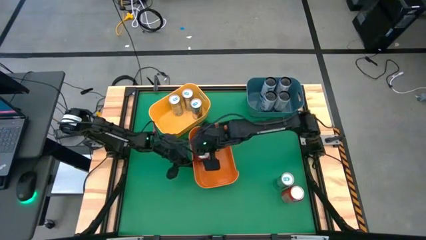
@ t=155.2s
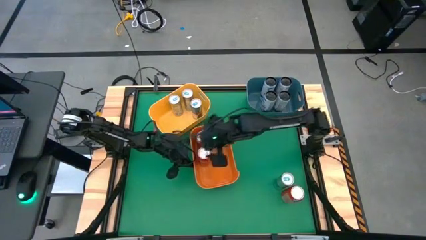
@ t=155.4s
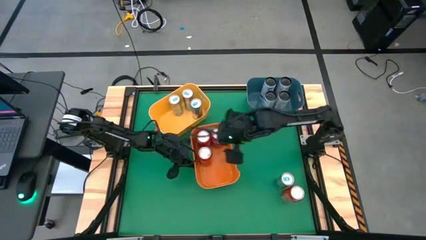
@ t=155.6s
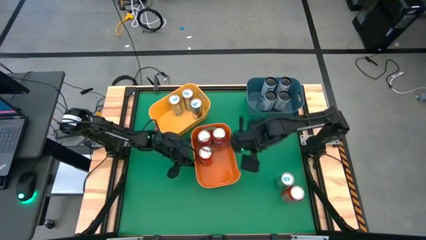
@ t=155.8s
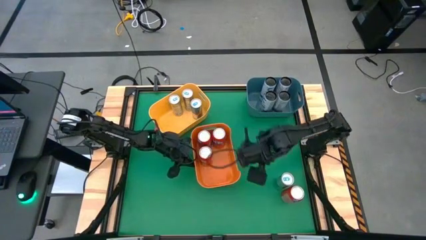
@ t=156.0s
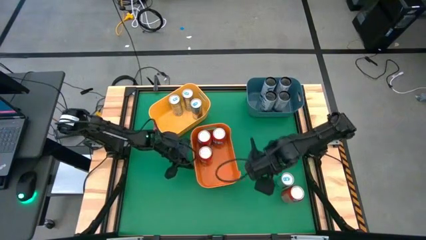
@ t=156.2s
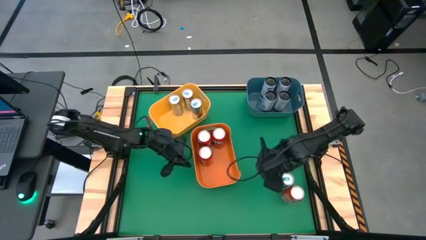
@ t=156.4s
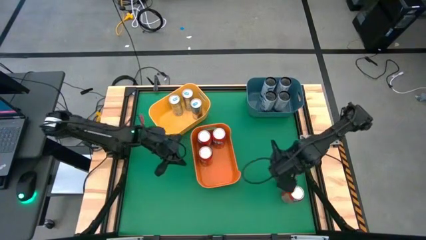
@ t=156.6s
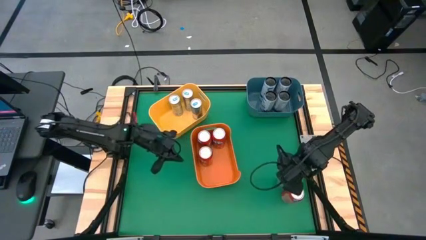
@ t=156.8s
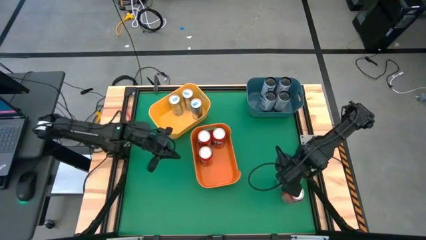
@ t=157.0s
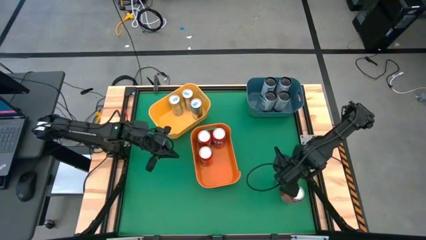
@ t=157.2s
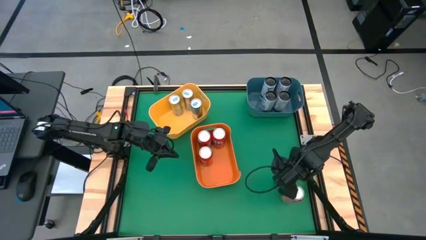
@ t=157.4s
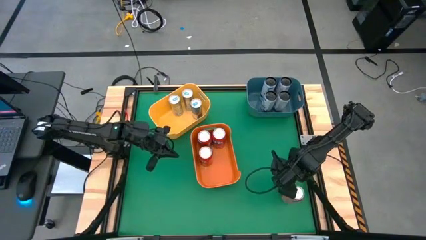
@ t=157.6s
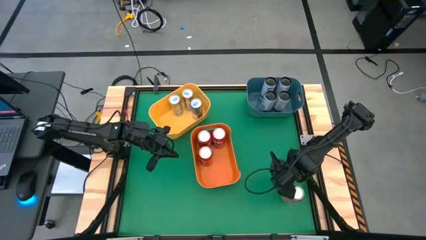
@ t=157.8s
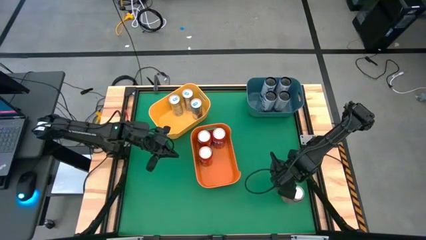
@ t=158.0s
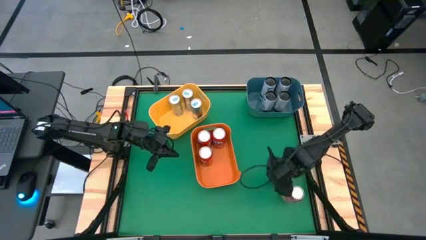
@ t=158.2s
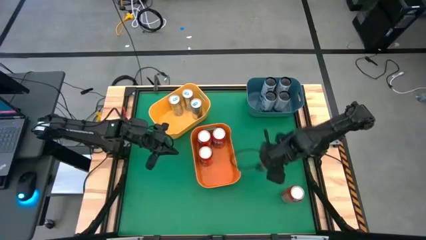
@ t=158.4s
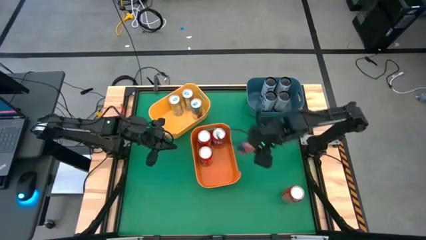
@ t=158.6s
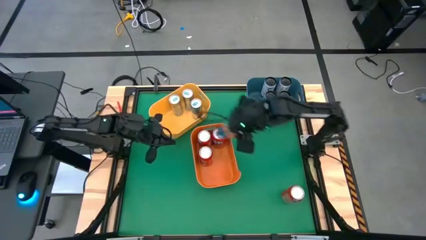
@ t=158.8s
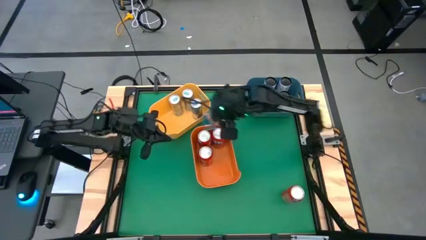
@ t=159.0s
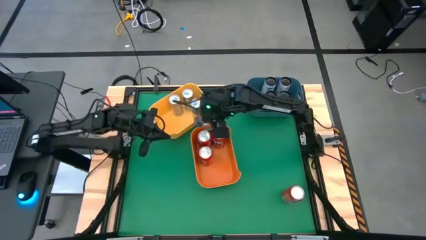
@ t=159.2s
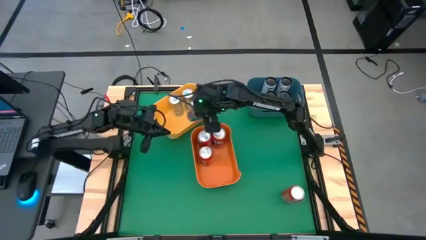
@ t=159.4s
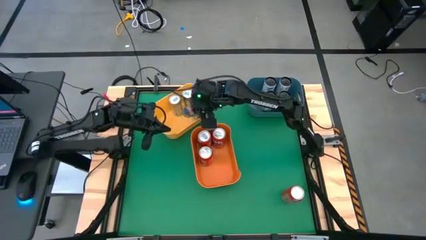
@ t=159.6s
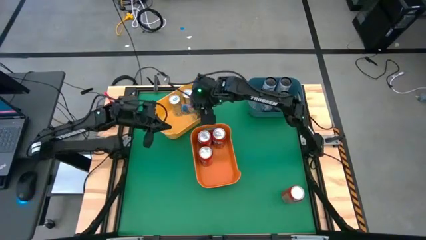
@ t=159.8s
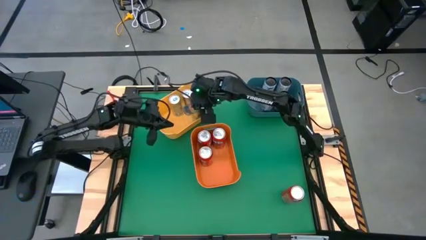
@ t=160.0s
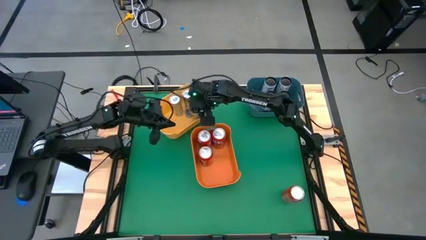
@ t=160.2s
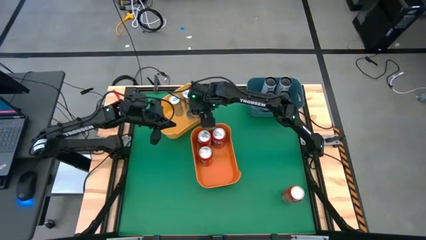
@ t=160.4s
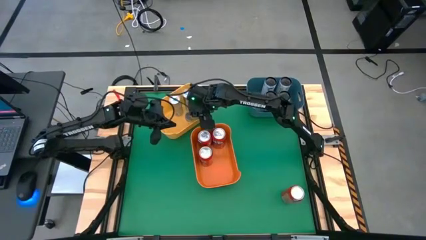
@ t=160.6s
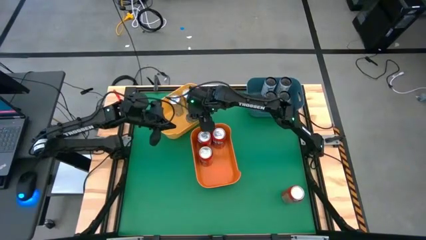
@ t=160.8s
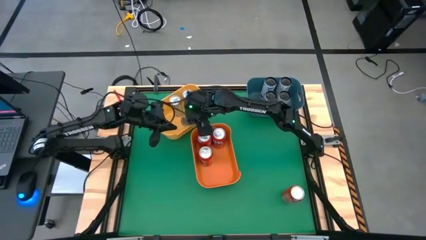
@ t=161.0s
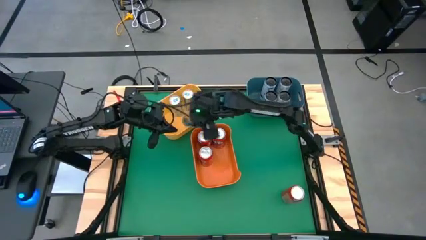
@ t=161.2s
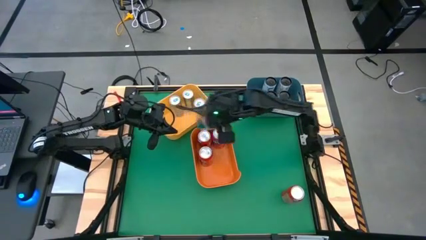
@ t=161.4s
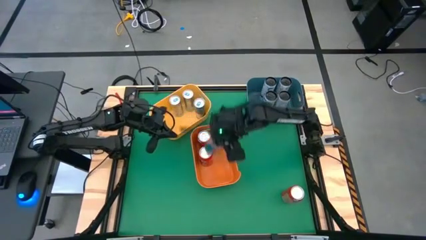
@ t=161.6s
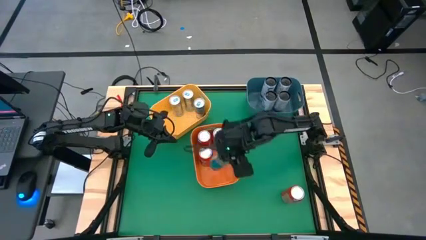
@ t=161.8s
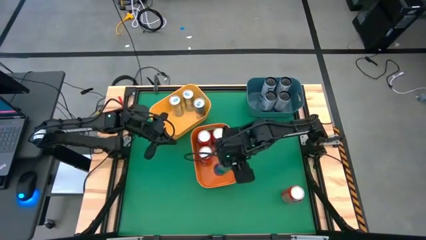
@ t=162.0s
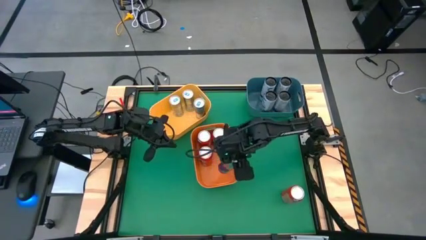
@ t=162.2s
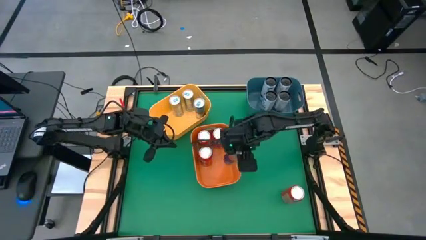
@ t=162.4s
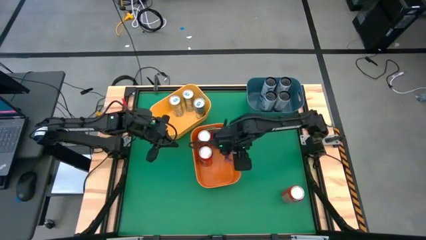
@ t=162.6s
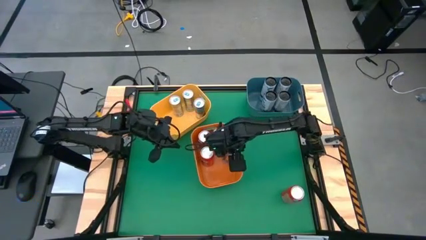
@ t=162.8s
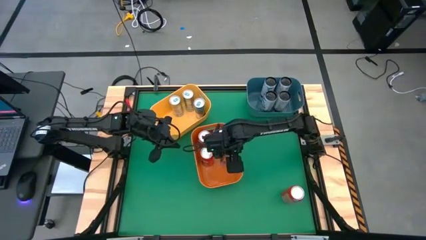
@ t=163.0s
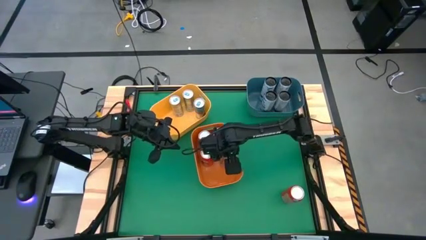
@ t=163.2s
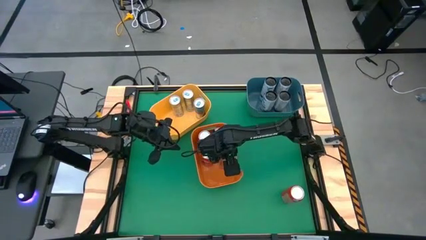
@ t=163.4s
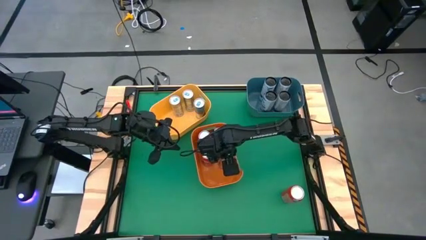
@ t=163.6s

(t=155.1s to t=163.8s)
Task: Sort soda cans
Put the blue soda can into the yellow bin

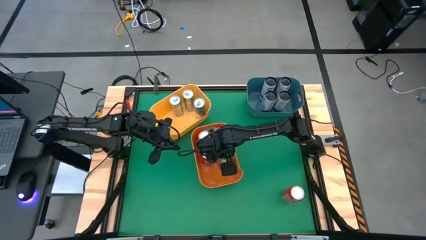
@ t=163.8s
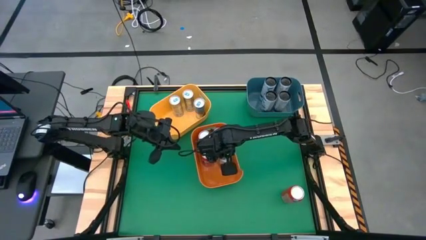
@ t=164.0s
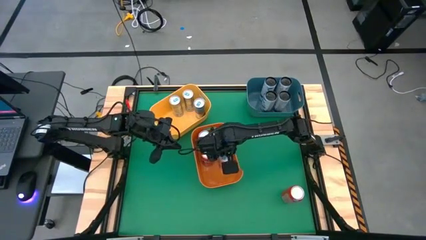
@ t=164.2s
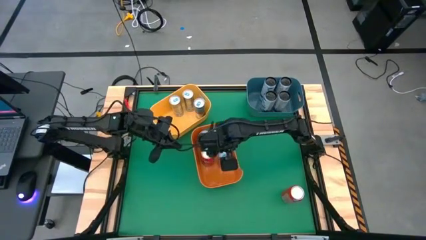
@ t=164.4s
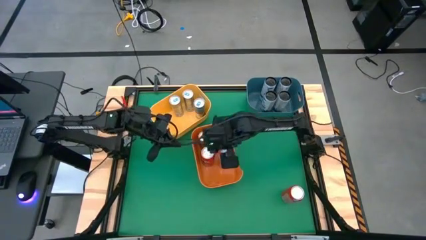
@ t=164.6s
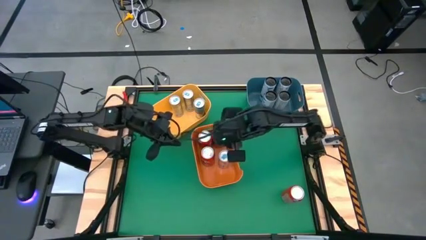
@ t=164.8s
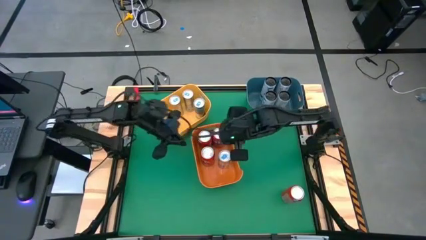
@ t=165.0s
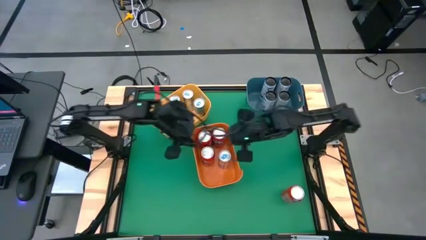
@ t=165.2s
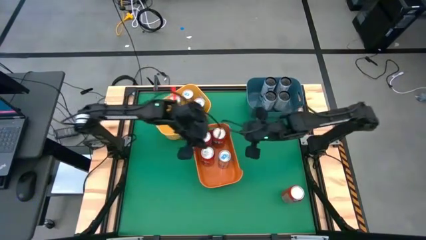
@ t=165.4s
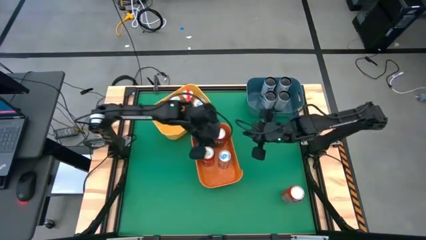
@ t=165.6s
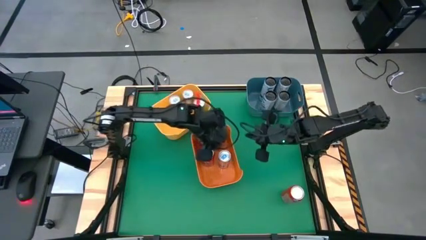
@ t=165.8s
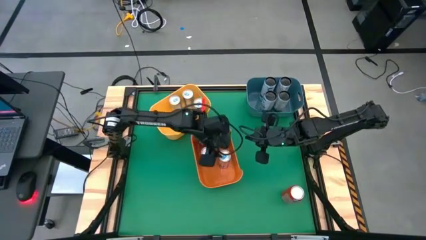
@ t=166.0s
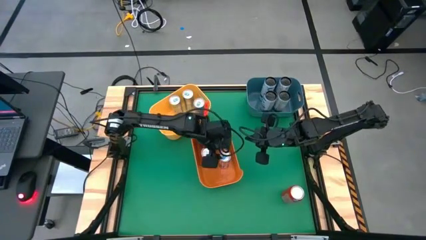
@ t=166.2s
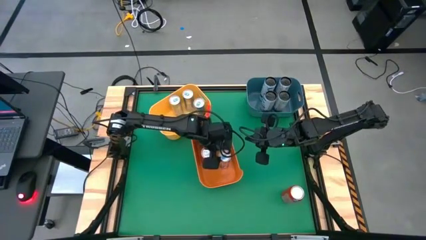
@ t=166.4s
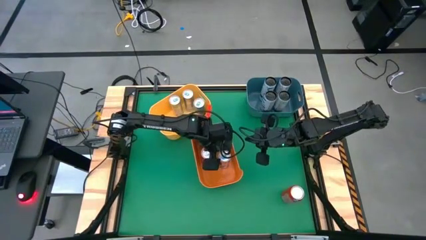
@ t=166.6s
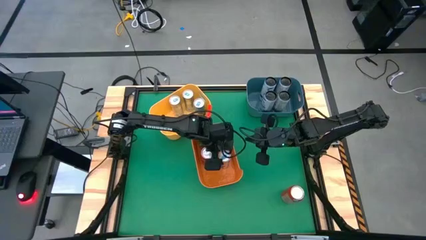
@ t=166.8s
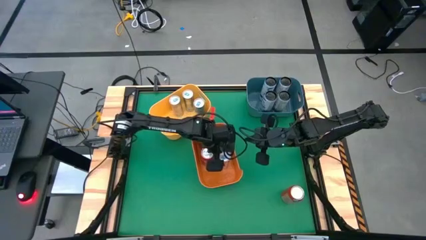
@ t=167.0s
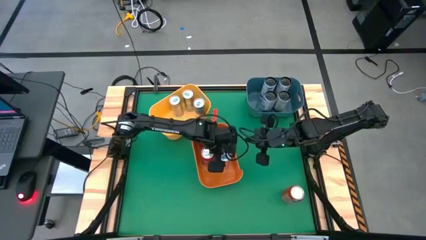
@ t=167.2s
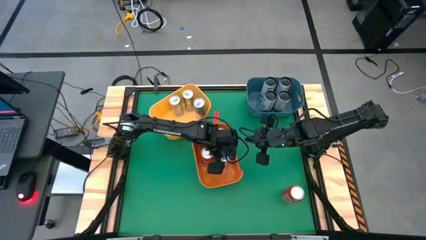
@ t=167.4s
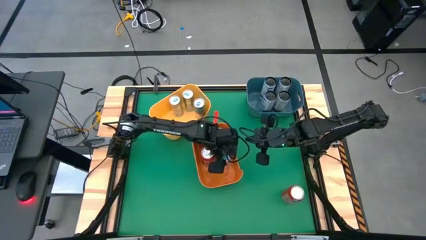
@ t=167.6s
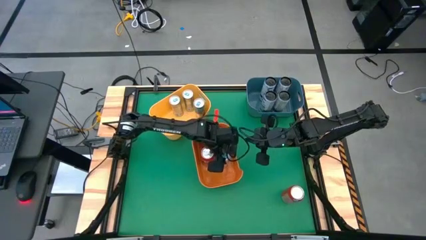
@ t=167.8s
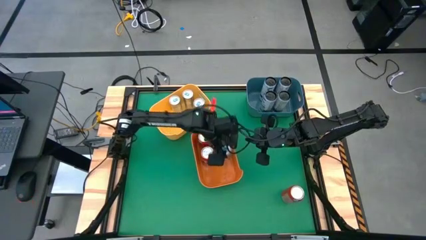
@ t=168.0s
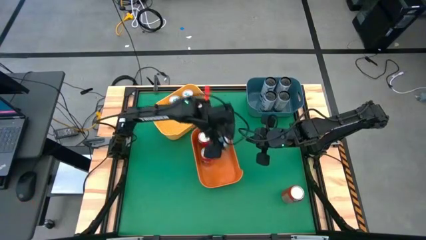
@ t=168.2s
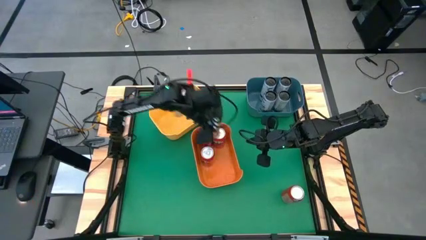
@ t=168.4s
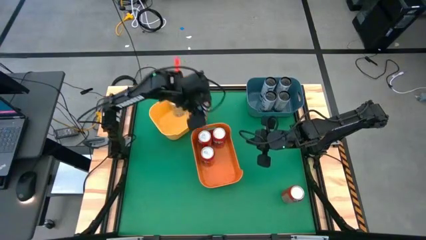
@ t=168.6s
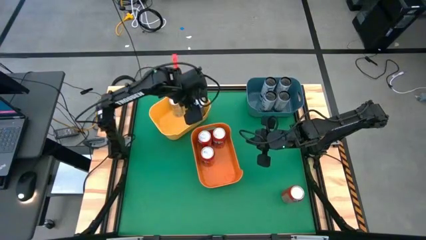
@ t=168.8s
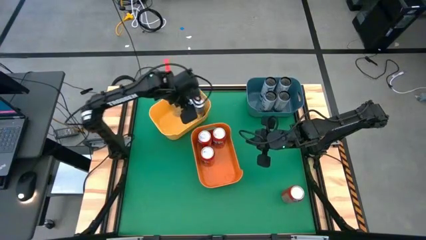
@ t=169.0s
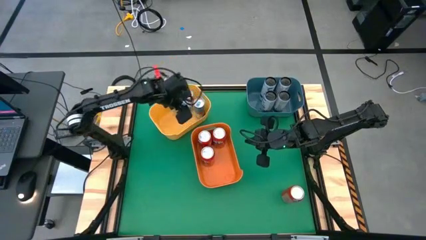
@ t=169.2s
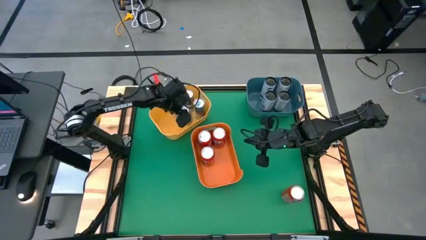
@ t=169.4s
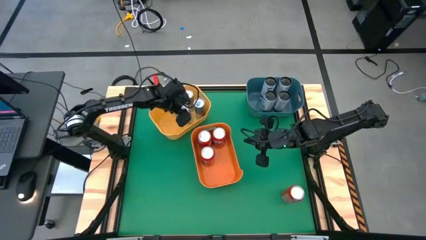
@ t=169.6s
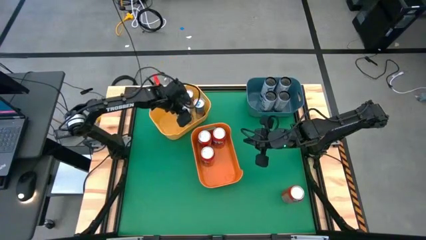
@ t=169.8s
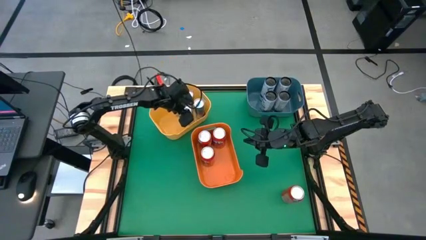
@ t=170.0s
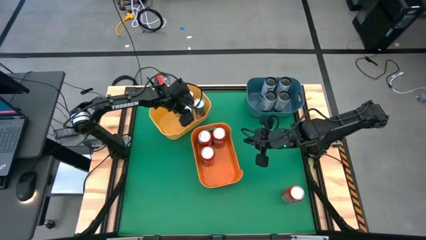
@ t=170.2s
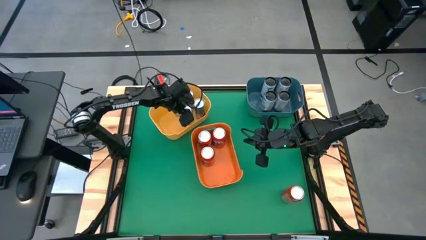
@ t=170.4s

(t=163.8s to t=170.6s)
Put the blue soda can into the yellow bin
